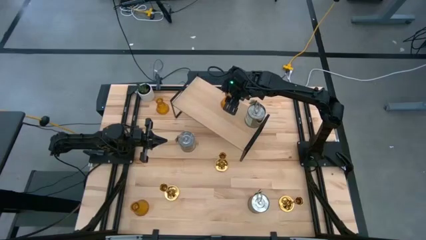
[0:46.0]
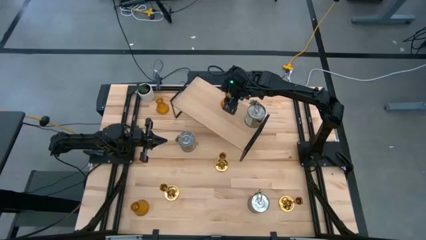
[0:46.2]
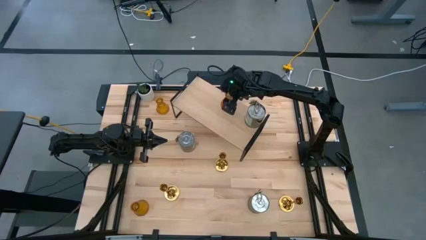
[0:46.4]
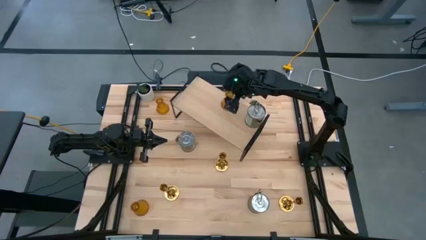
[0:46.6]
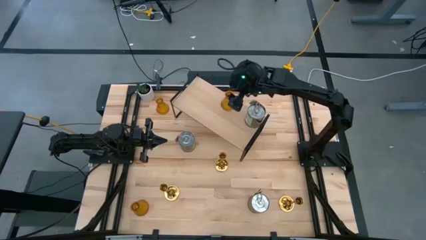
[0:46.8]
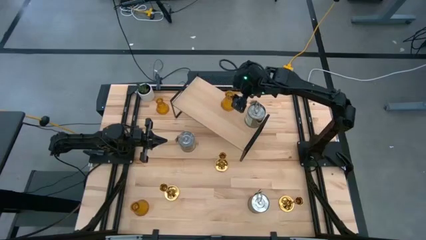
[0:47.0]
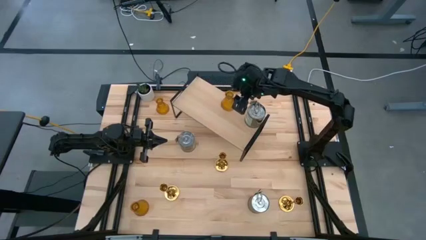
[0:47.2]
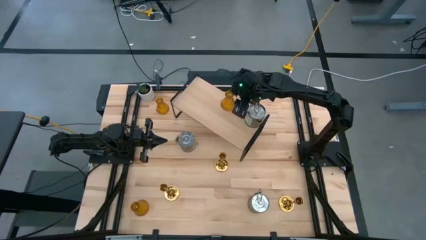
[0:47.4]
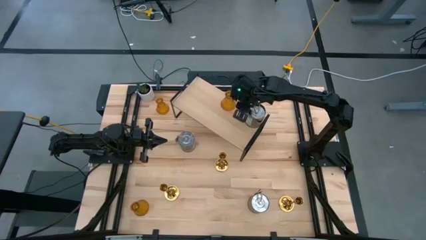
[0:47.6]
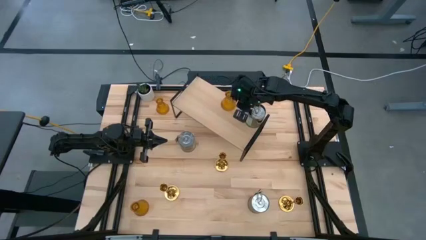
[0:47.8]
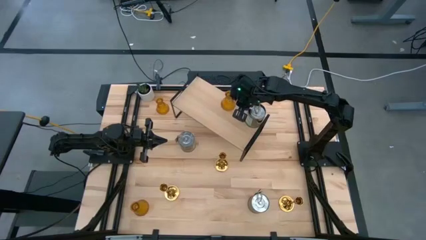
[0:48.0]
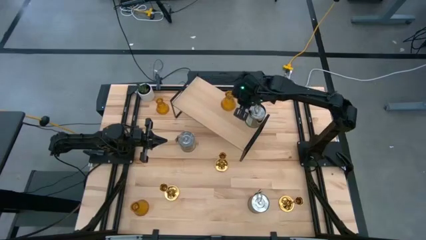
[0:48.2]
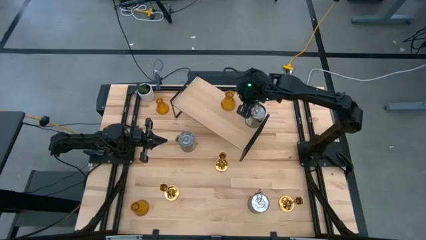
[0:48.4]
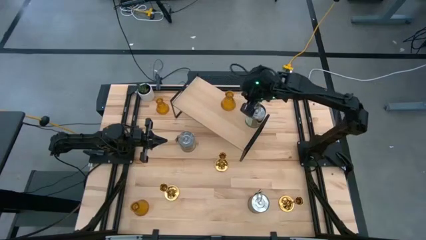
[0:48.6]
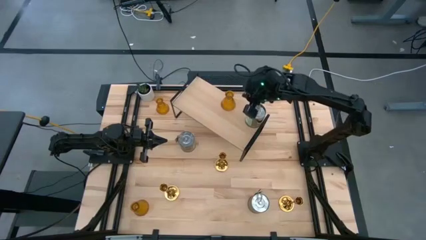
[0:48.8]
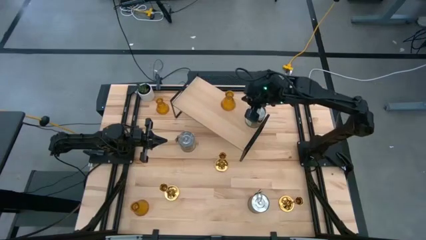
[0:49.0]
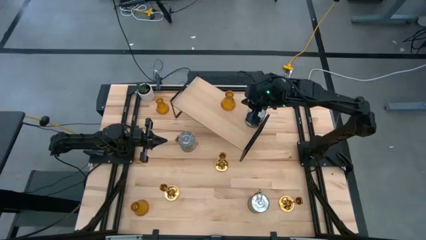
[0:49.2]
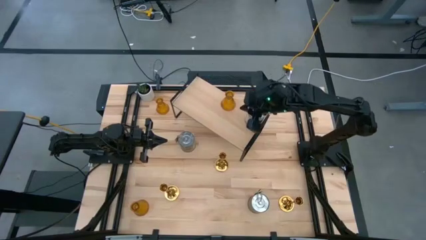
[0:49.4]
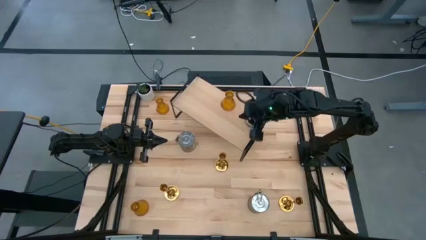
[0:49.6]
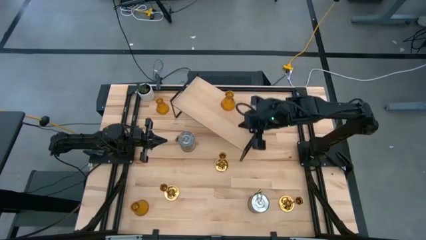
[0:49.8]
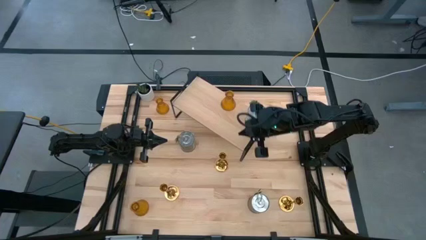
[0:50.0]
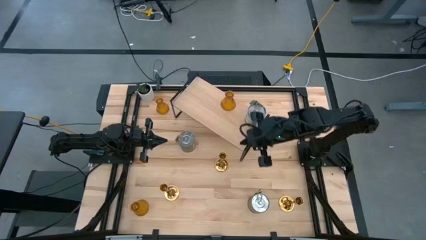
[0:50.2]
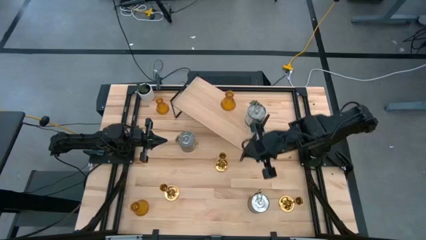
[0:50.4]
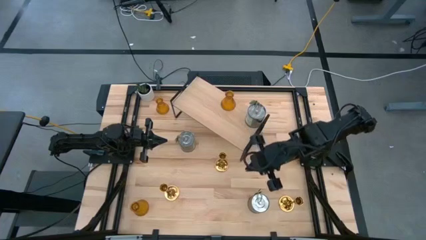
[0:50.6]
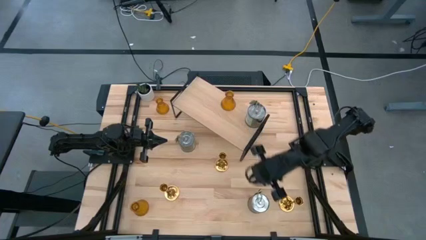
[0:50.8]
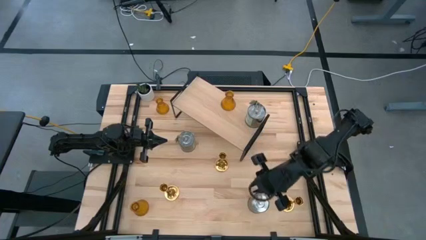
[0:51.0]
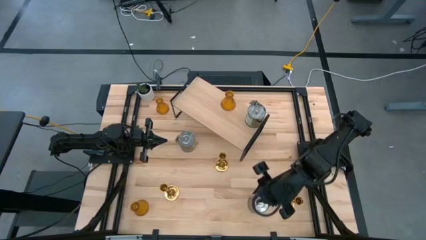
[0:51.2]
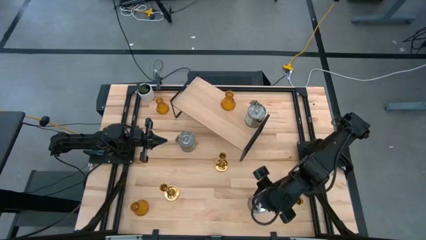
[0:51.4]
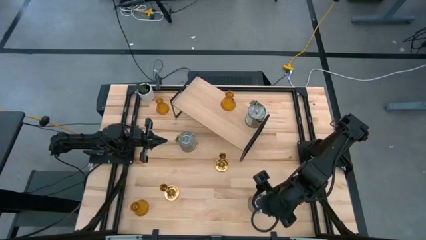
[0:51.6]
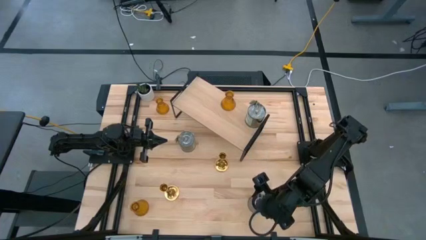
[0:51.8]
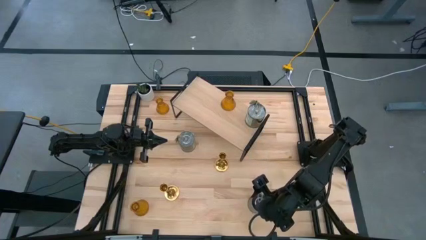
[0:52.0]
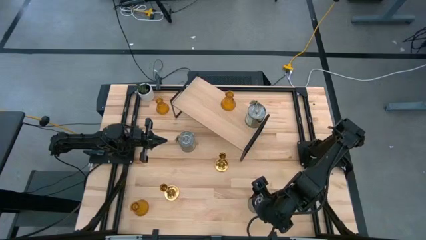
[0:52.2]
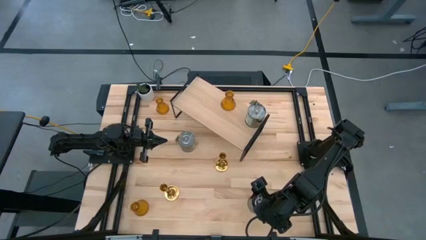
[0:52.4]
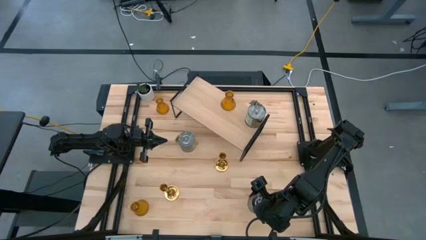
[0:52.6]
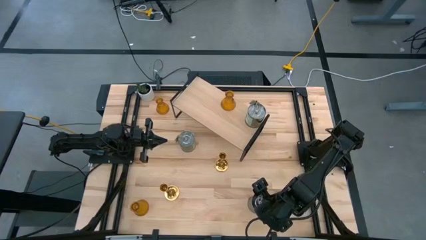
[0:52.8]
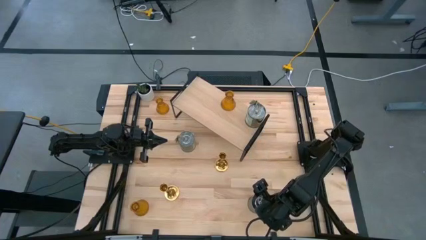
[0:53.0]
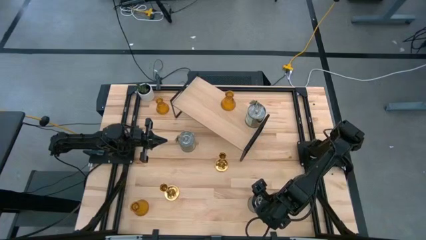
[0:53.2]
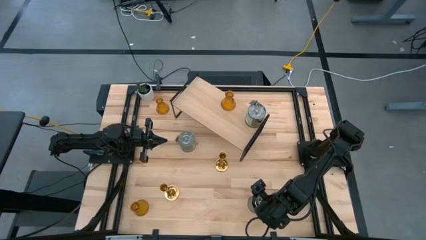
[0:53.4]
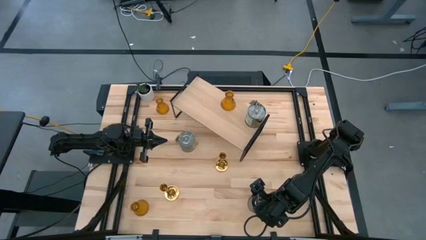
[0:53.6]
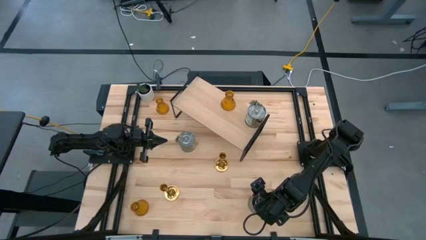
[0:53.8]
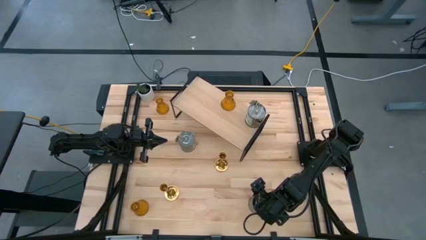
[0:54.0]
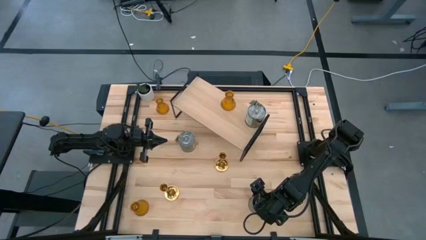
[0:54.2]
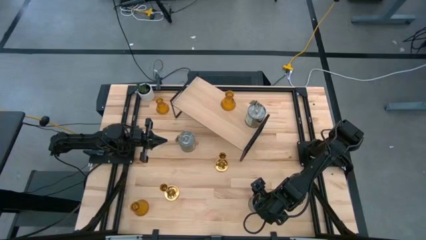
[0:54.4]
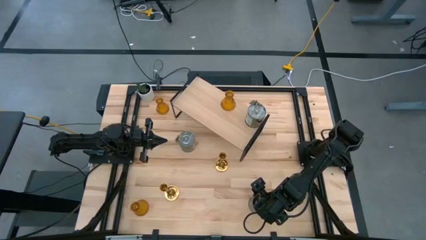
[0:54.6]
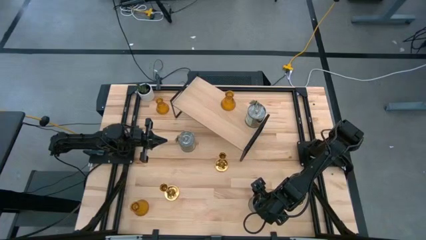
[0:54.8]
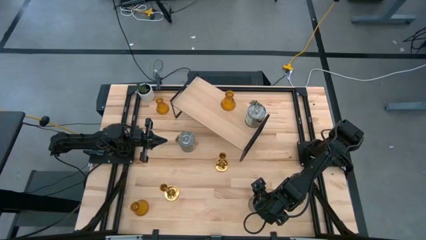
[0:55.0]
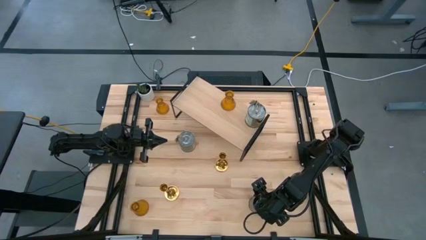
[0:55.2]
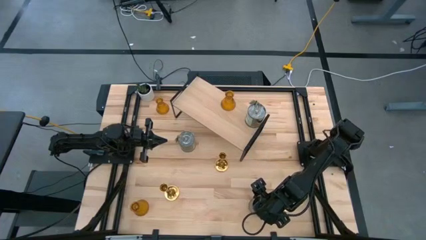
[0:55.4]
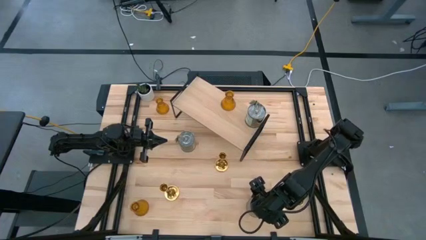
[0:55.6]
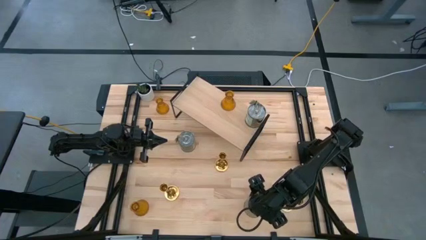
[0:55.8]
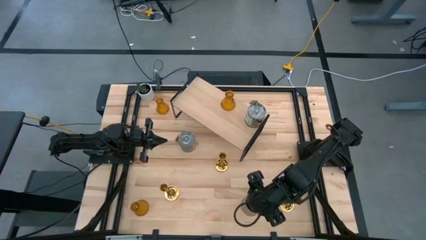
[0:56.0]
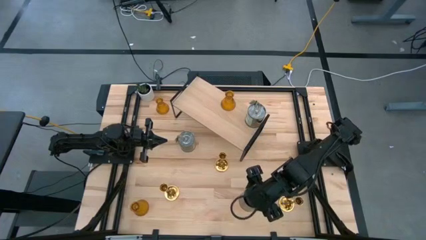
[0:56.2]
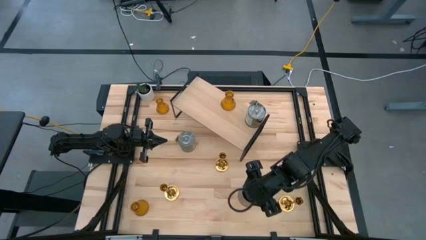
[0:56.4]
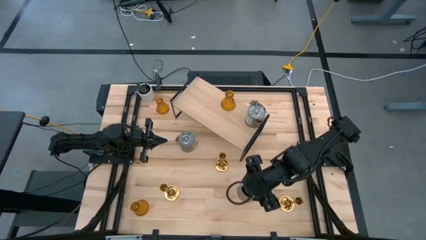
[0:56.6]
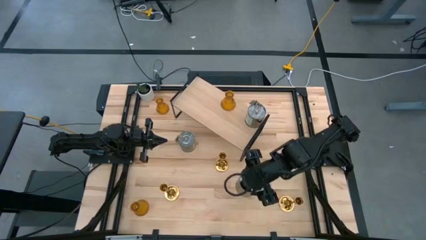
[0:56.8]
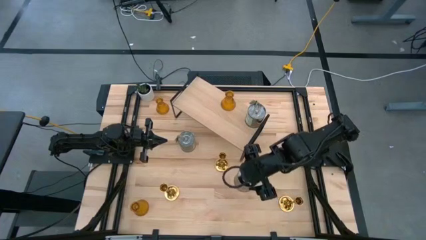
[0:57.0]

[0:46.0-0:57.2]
Task: Pick & Place candle stick holders
Put the bottom scented candle on the shelf aligned with the other scented candle
